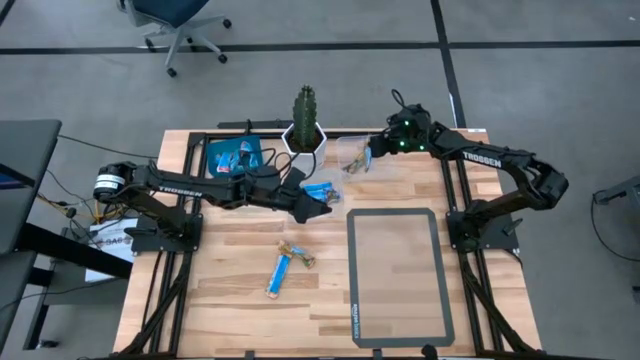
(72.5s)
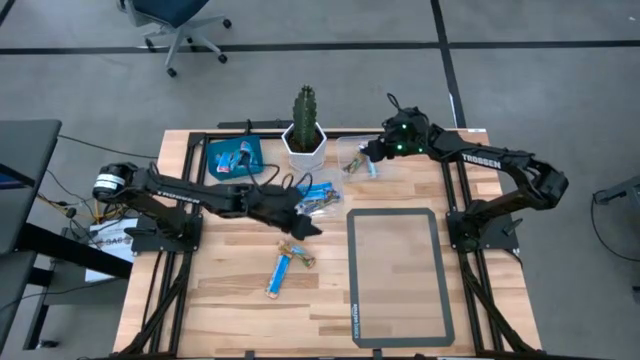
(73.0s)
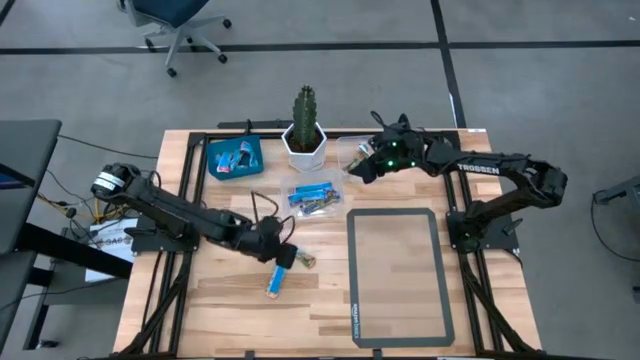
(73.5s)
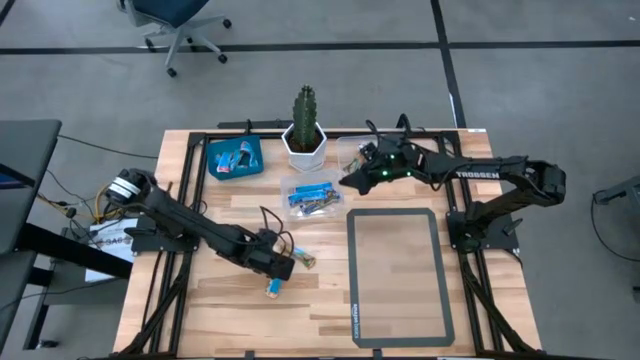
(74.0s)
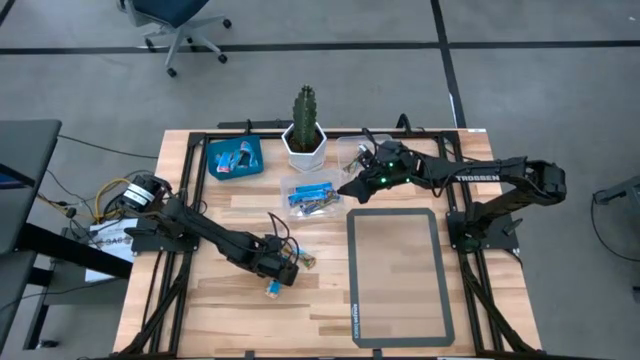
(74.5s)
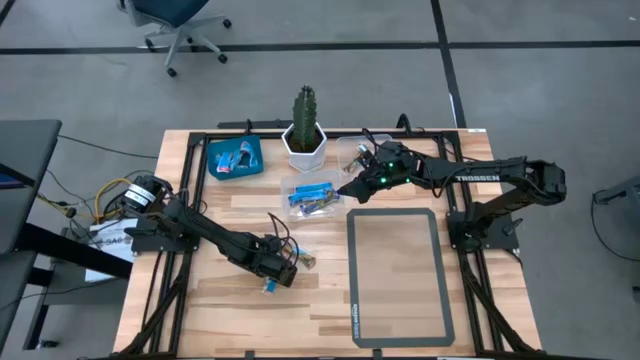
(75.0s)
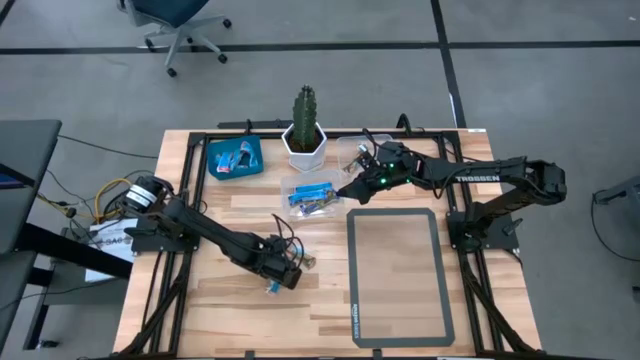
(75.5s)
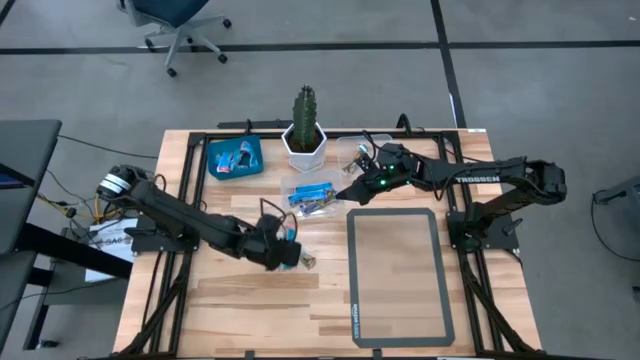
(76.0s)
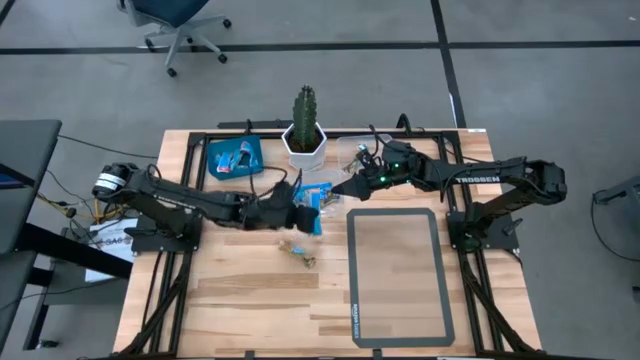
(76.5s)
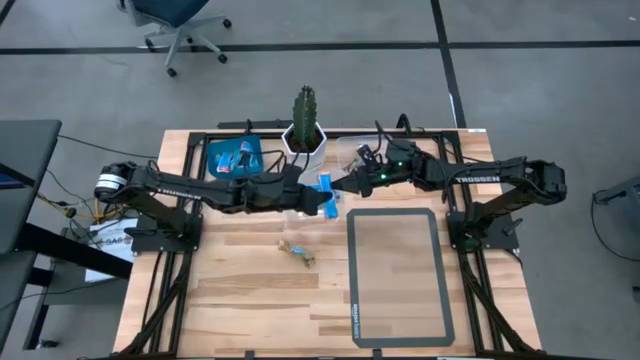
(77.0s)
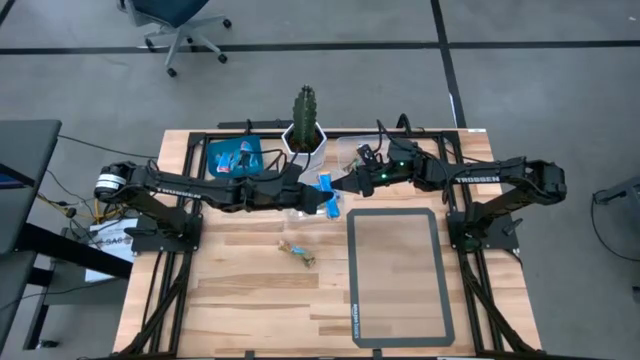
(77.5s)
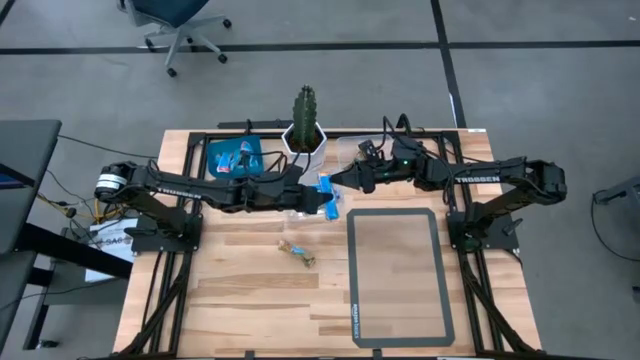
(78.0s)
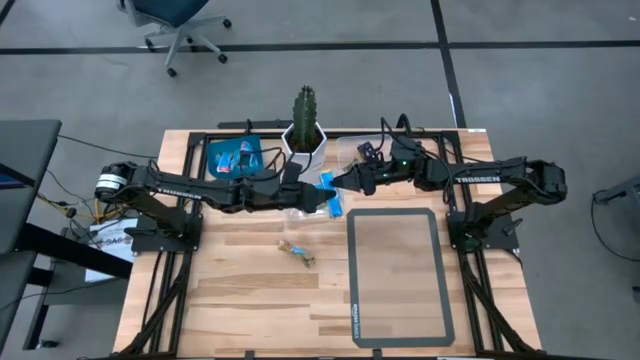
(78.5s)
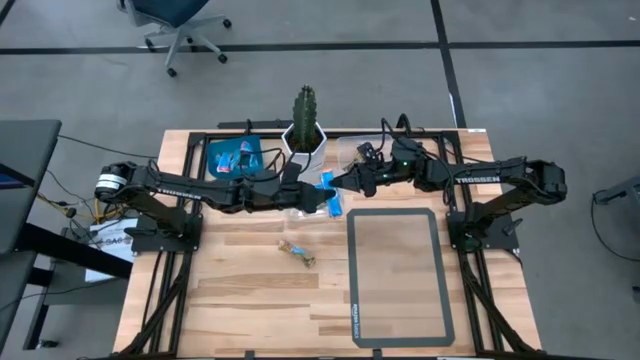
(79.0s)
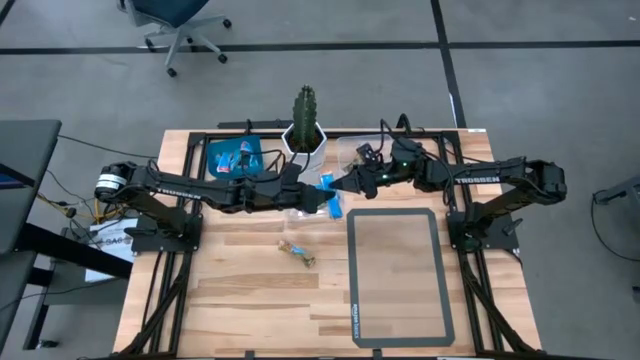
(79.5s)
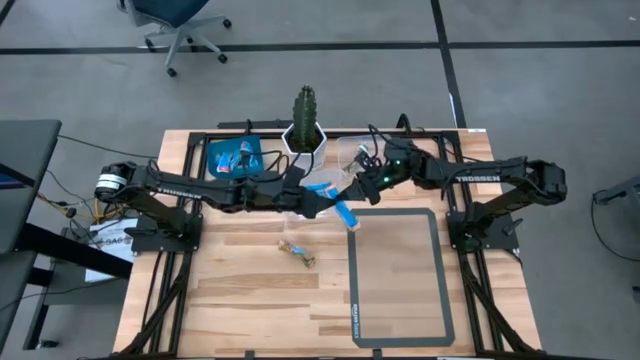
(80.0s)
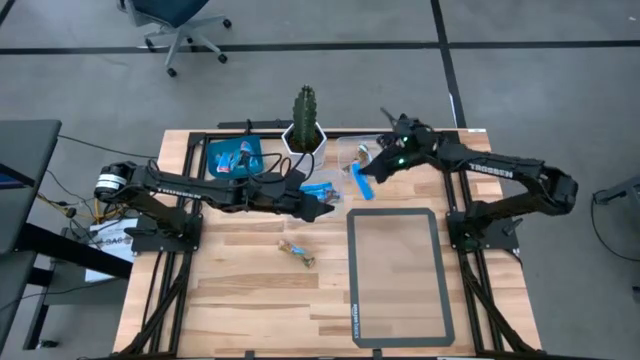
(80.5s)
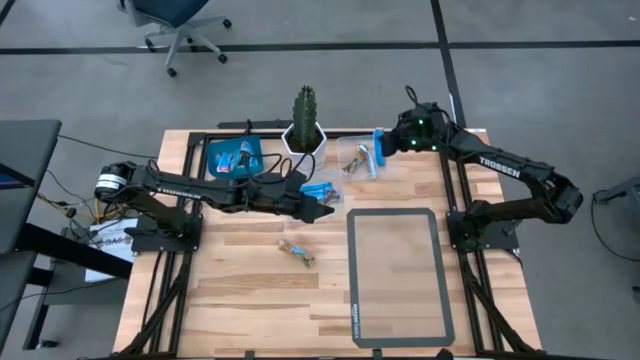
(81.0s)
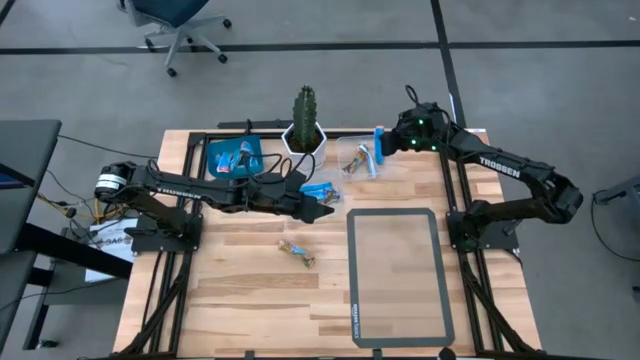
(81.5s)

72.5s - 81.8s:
Task: Pick and place Granola Bars by type
Put the yellow granola bar into the top transparent bin

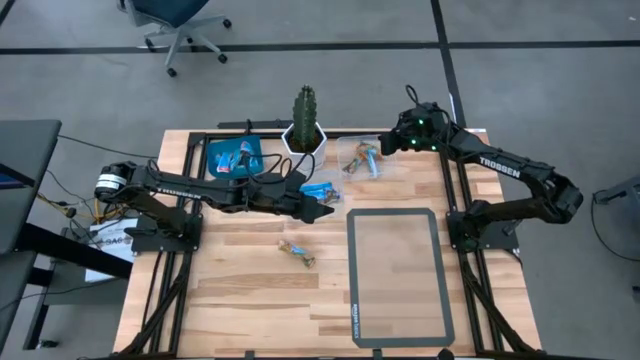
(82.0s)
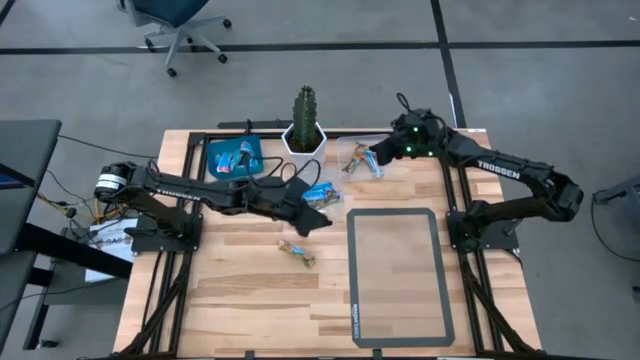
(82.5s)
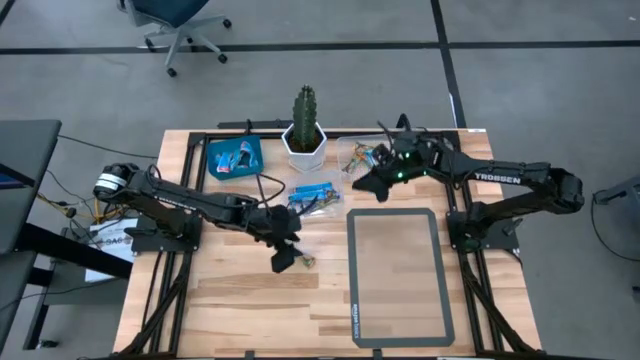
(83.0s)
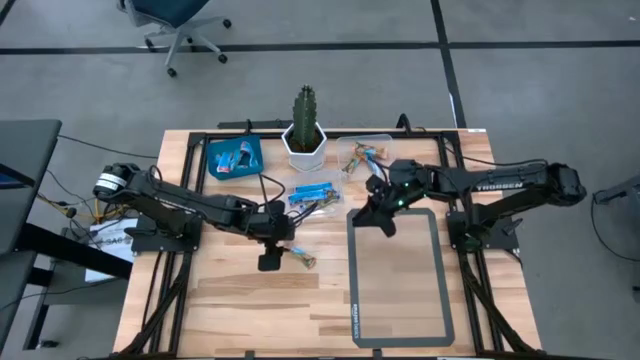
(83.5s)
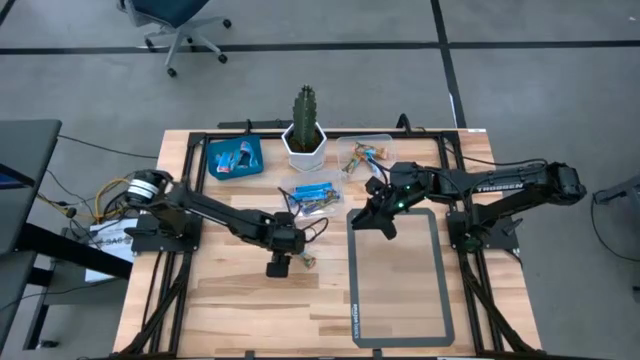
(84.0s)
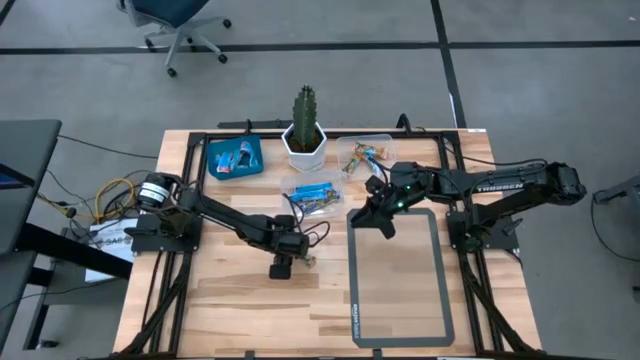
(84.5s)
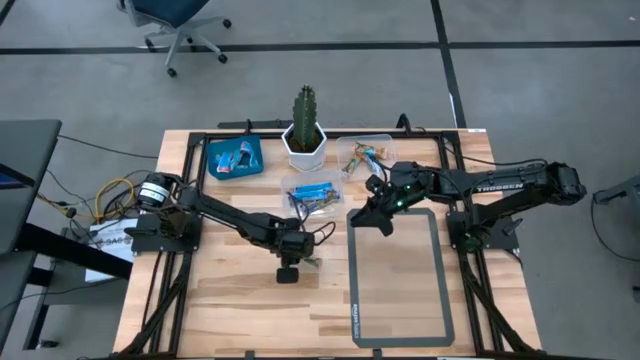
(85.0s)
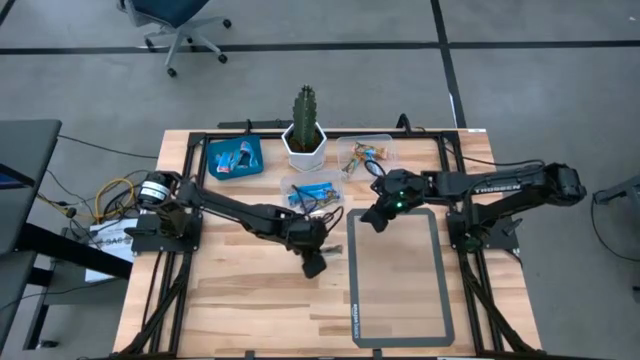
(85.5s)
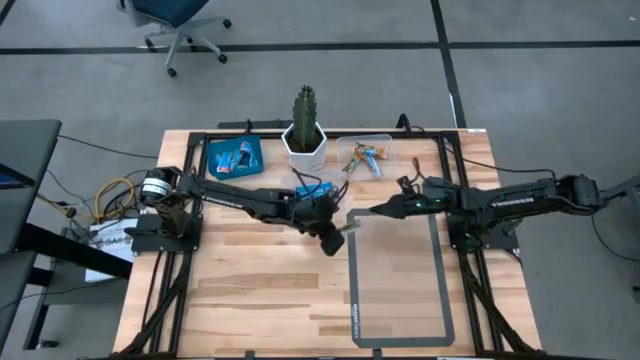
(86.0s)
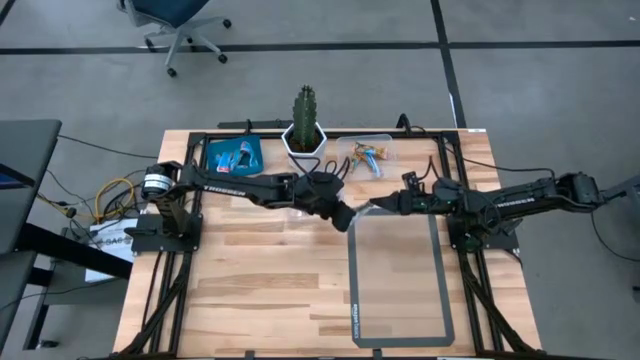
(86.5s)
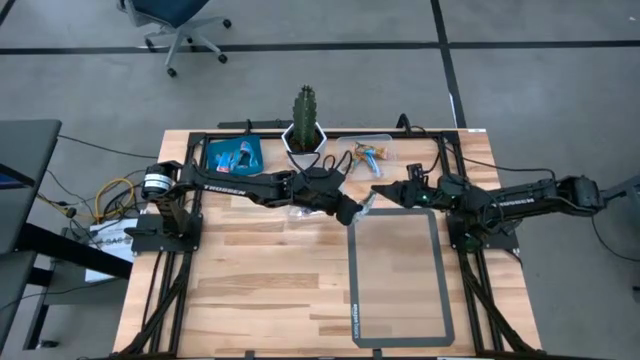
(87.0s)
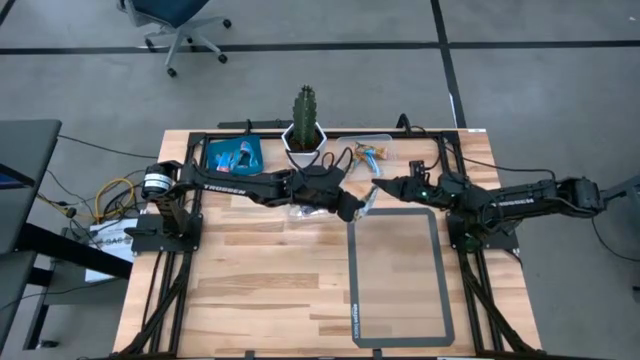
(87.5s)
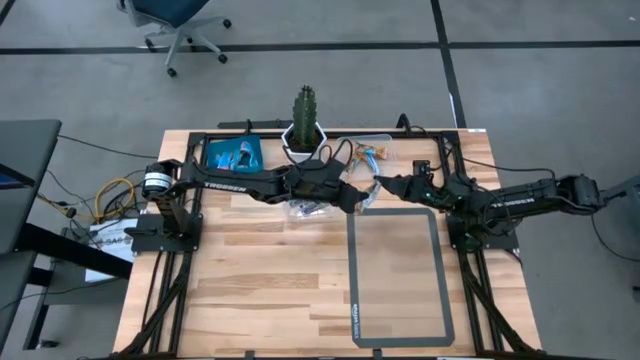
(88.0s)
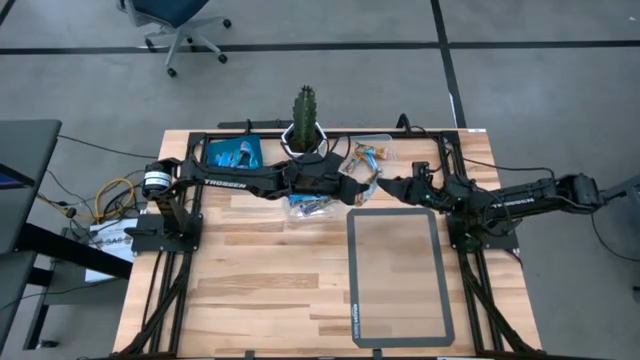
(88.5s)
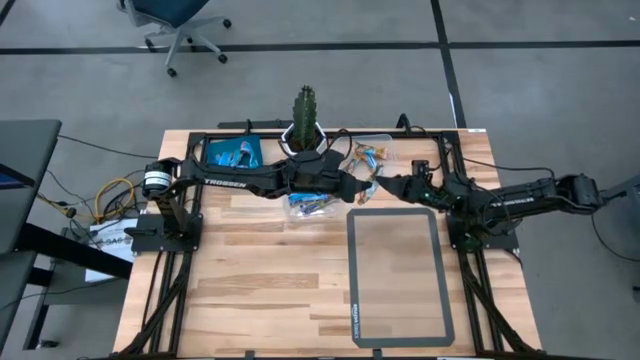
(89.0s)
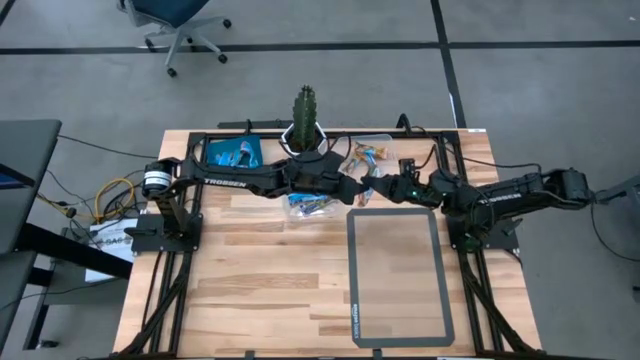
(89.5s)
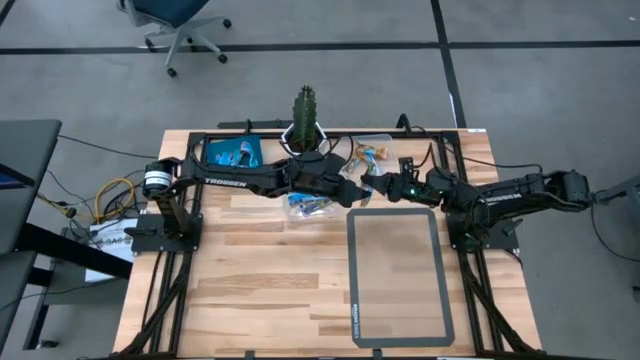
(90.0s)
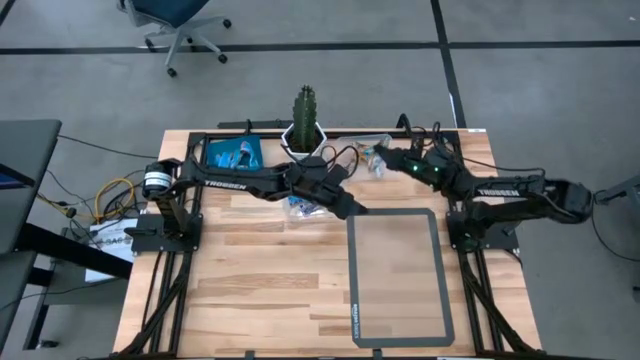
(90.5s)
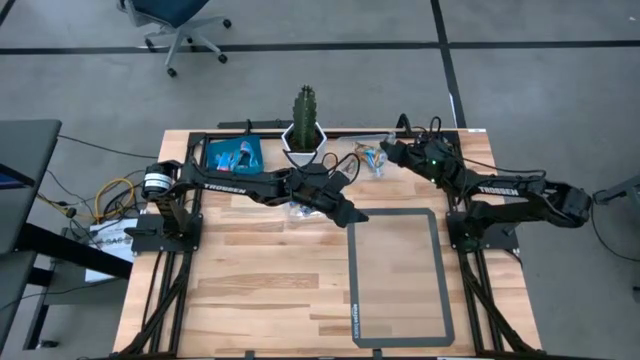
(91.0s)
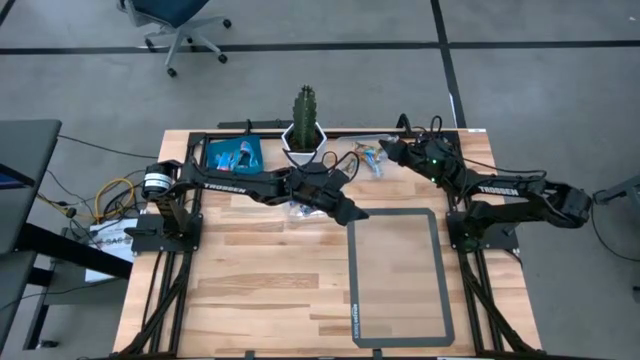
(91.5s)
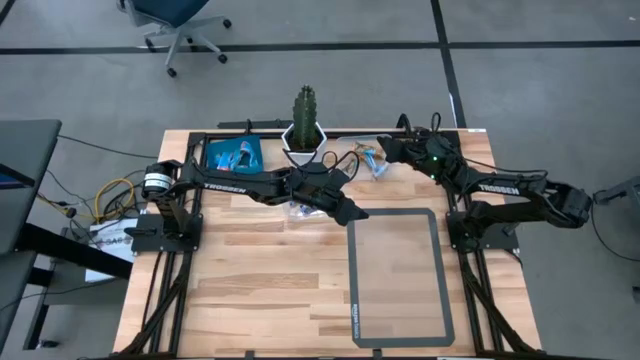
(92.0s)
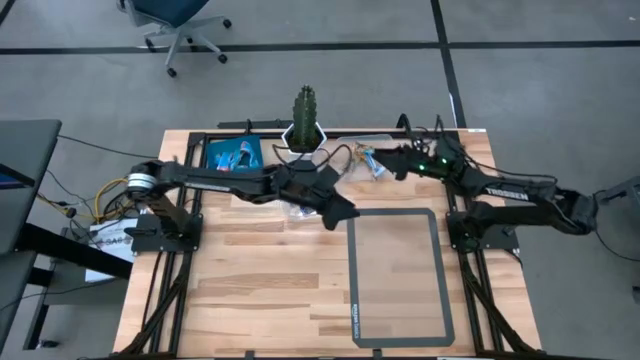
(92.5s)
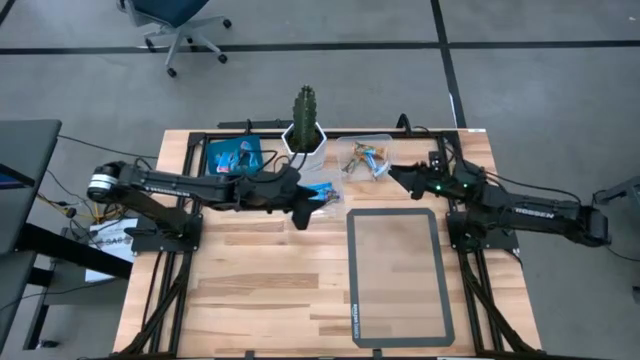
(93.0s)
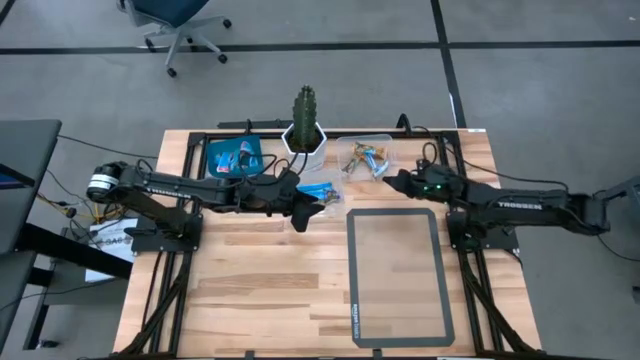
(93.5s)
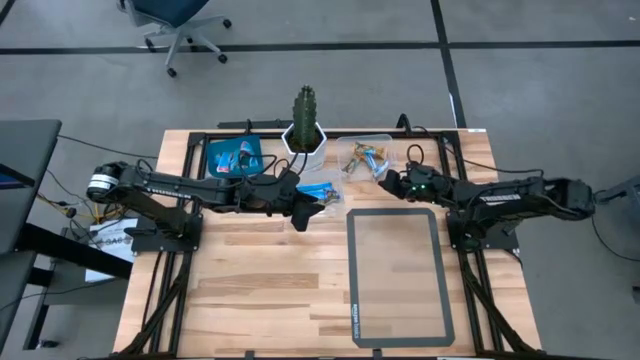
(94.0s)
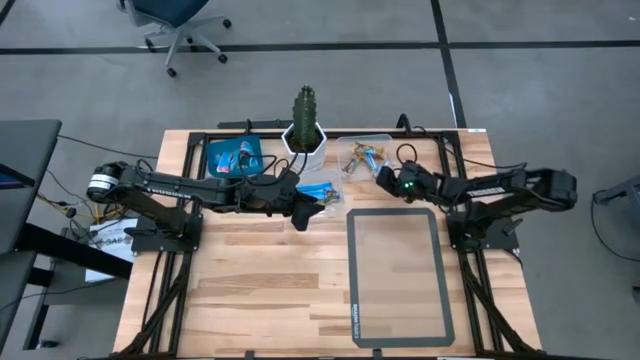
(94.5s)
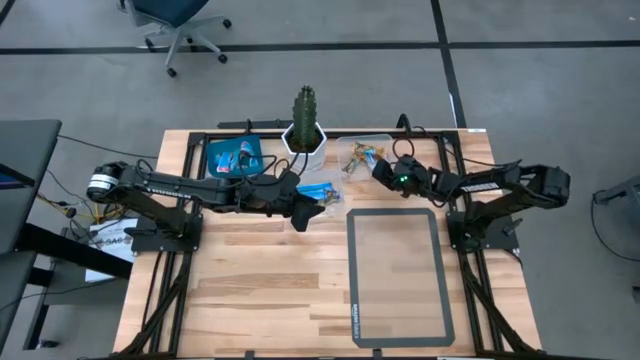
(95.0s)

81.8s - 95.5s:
Put the yellow granola bar into the top transparent bin
